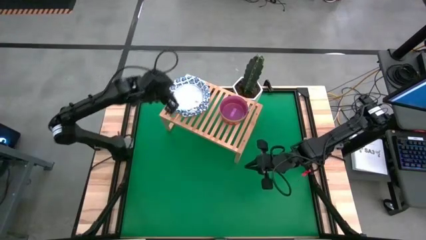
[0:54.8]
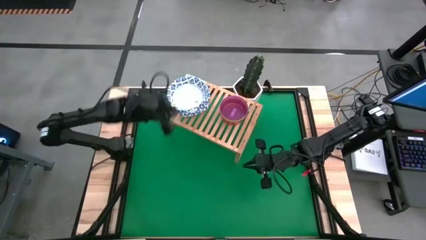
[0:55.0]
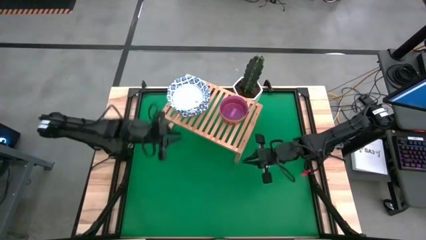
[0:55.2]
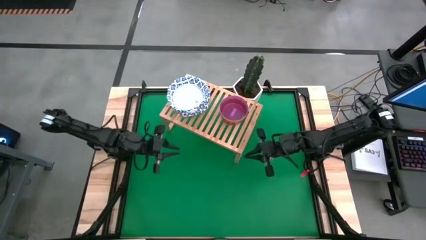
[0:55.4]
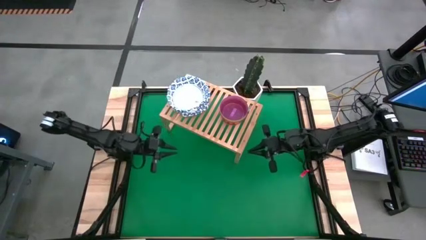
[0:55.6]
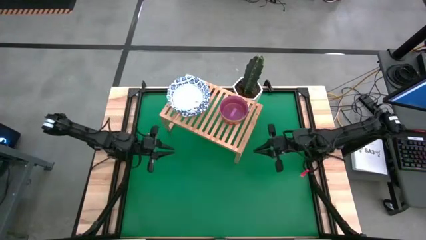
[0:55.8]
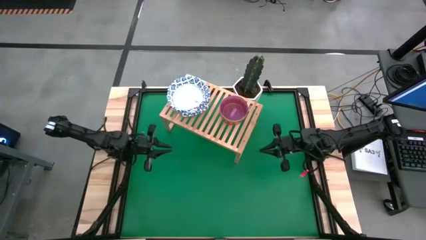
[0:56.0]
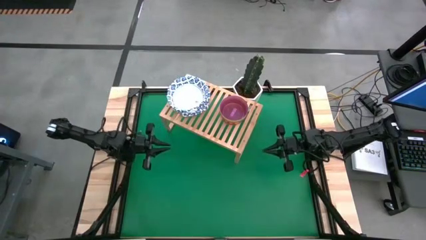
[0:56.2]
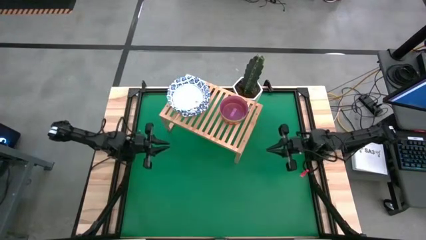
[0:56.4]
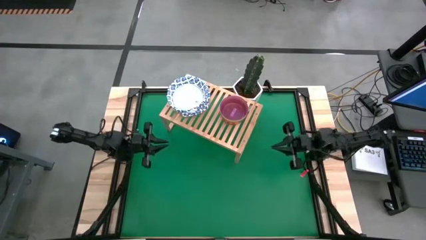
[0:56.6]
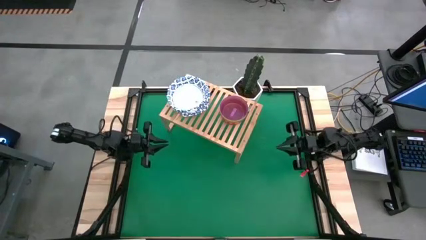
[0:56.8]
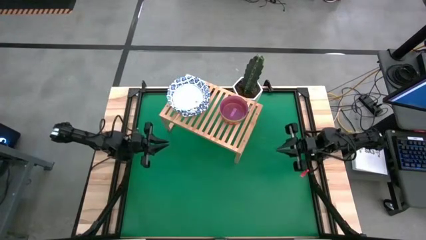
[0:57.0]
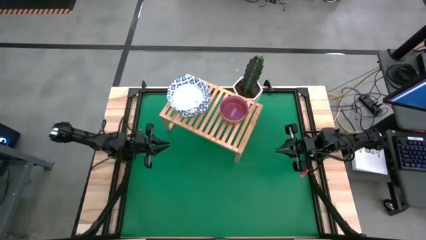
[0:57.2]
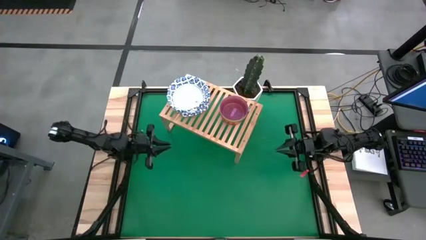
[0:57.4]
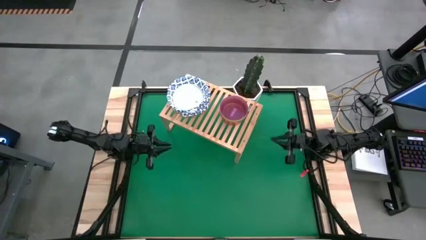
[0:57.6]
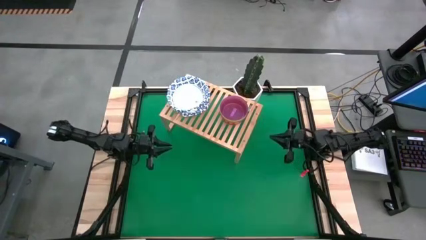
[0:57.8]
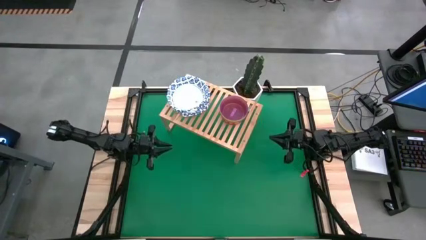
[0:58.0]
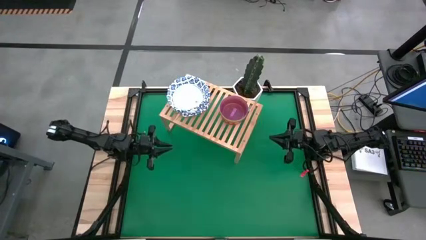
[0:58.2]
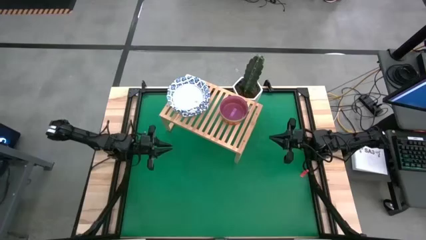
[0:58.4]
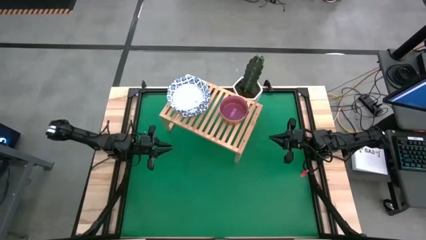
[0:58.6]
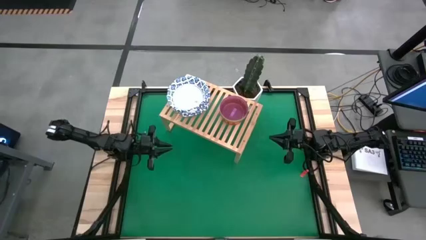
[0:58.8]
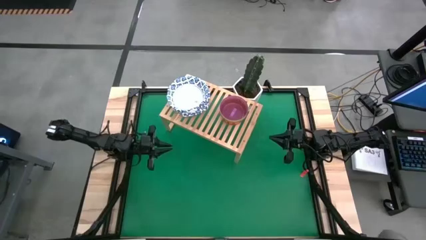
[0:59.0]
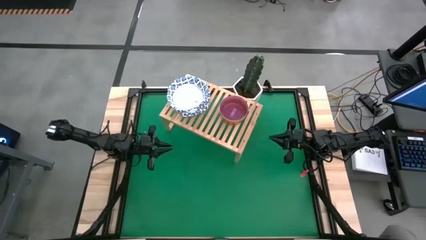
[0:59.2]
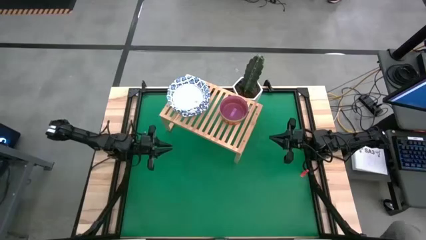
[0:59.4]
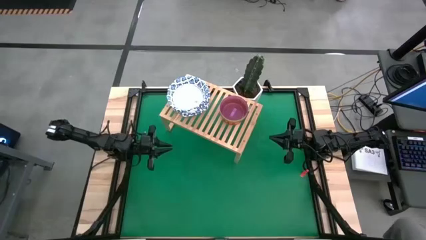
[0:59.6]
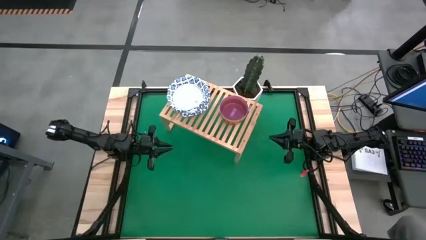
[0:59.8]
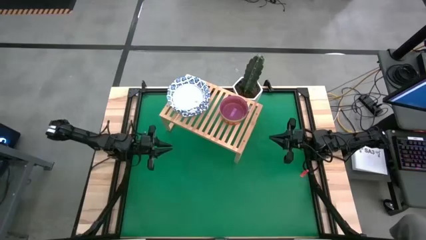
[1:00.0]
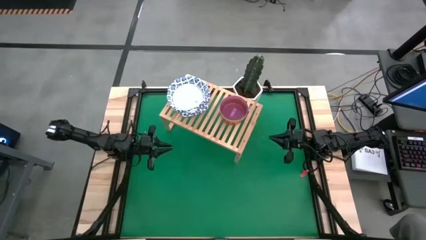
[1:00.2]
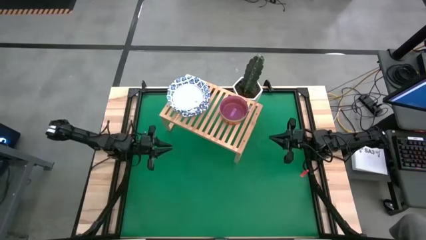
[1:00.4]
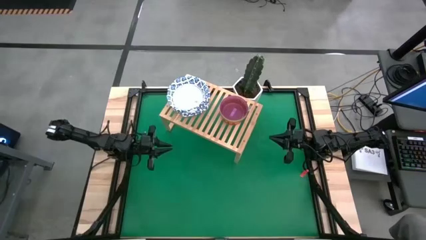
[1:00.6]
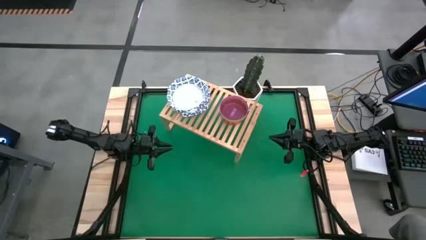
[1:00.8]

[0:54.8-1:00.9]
Task: Place and stack bowls onto a shelf
Return to Home Position

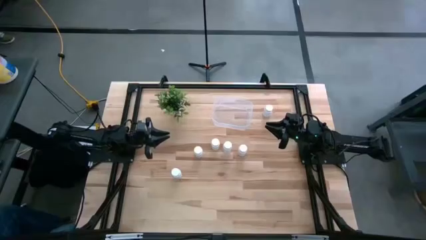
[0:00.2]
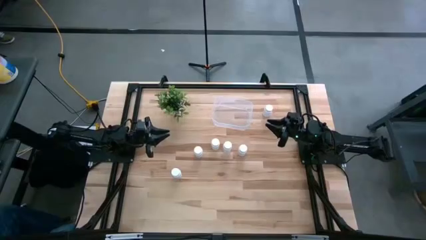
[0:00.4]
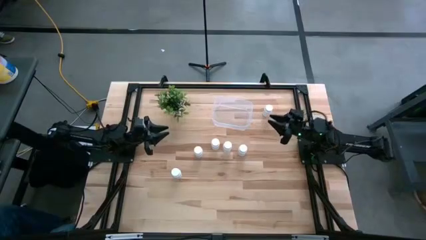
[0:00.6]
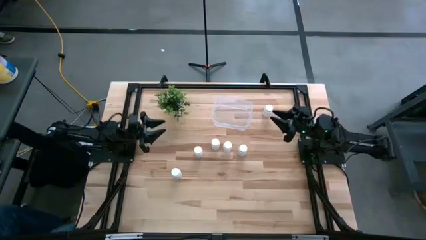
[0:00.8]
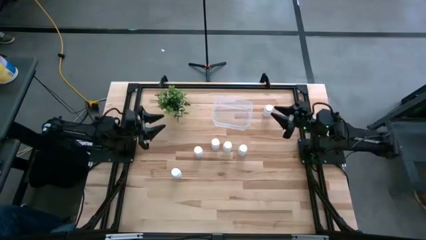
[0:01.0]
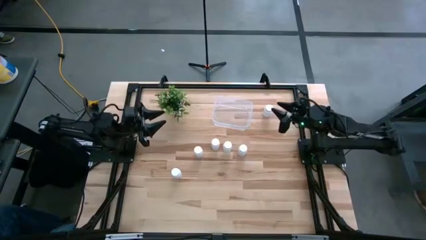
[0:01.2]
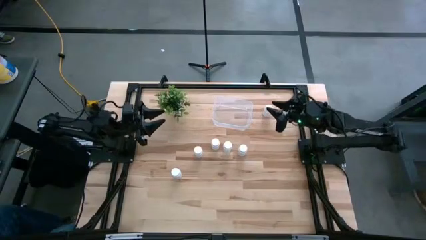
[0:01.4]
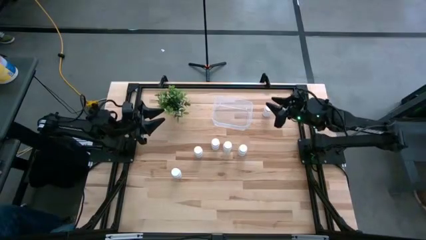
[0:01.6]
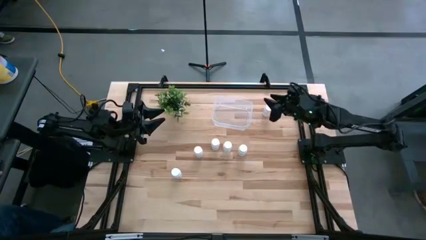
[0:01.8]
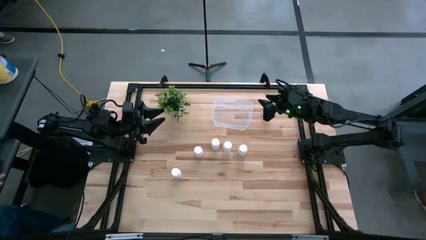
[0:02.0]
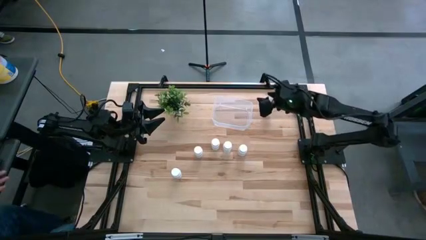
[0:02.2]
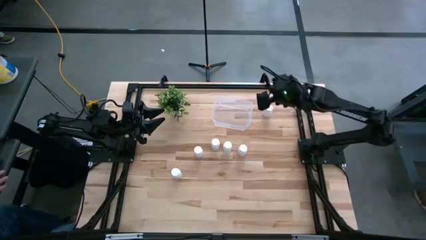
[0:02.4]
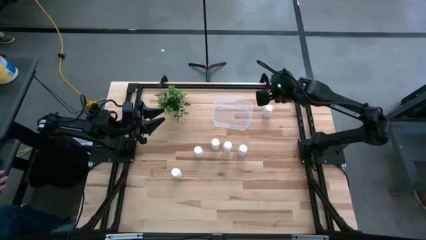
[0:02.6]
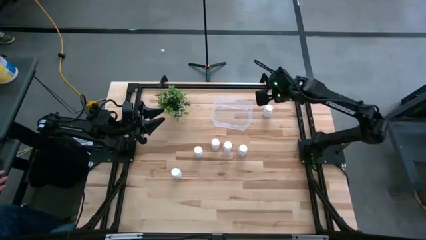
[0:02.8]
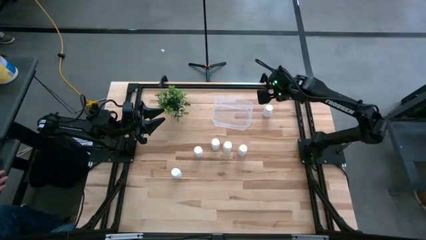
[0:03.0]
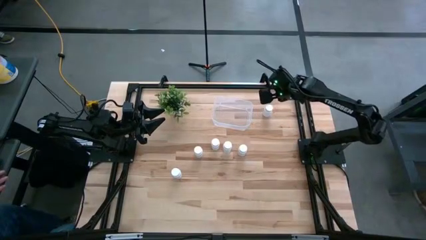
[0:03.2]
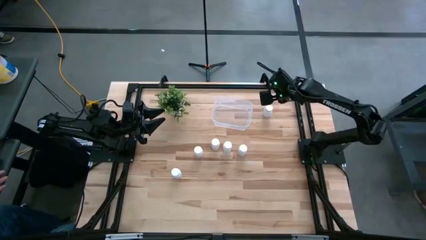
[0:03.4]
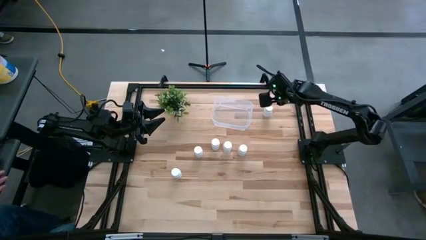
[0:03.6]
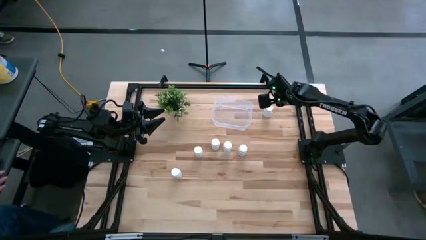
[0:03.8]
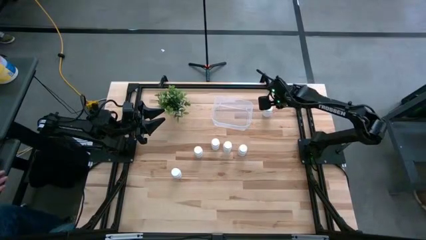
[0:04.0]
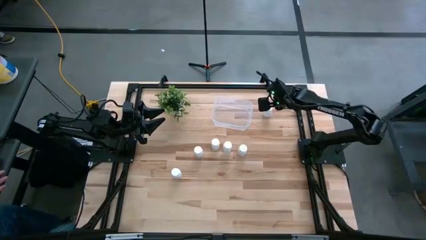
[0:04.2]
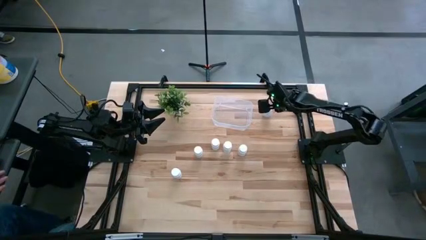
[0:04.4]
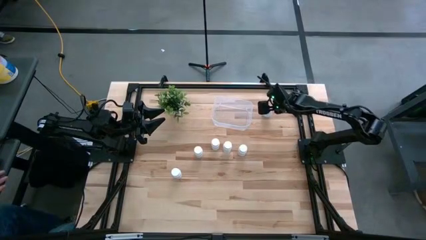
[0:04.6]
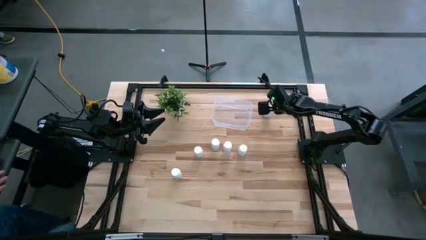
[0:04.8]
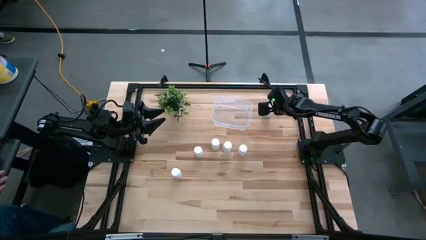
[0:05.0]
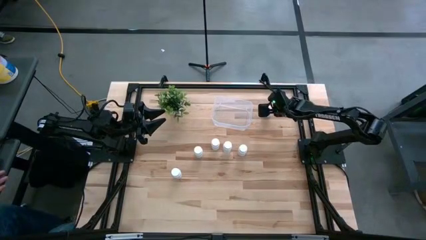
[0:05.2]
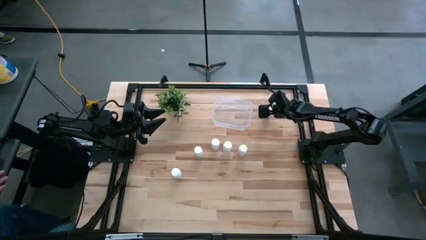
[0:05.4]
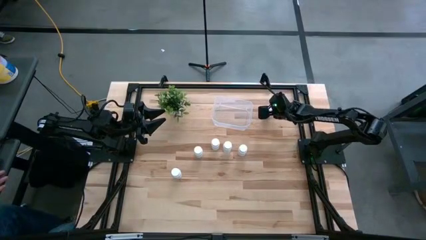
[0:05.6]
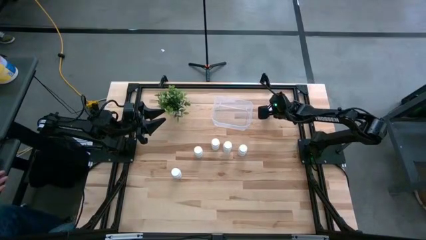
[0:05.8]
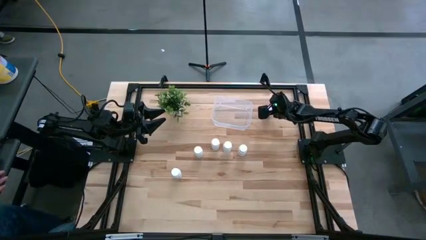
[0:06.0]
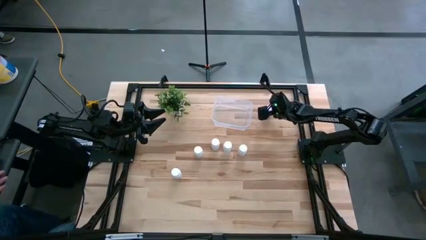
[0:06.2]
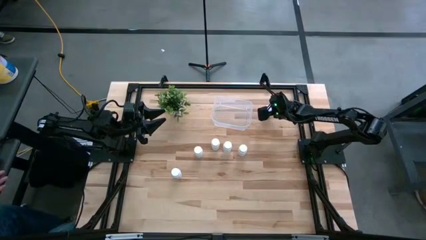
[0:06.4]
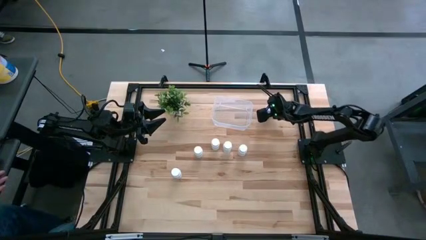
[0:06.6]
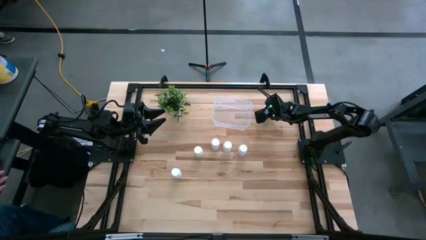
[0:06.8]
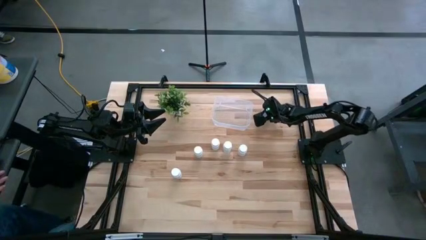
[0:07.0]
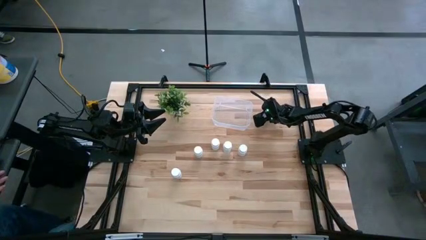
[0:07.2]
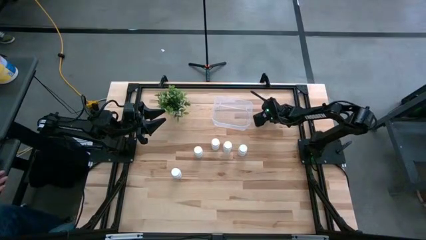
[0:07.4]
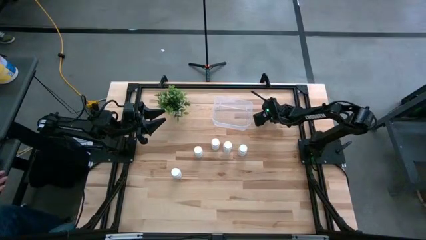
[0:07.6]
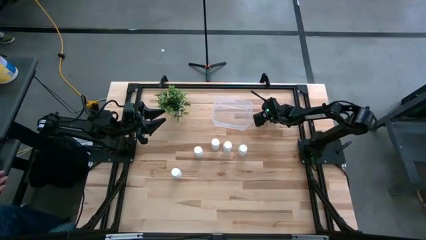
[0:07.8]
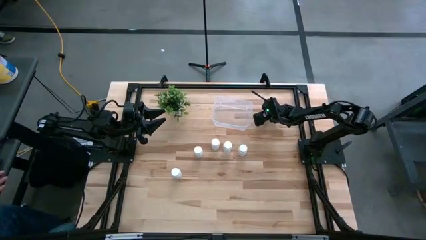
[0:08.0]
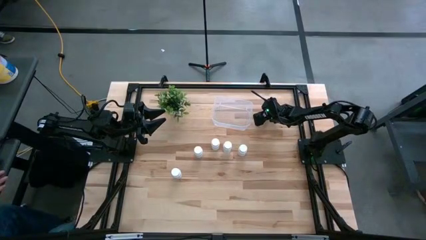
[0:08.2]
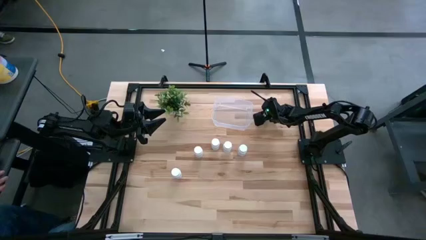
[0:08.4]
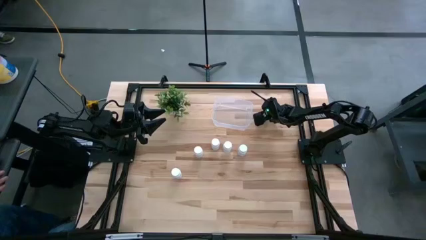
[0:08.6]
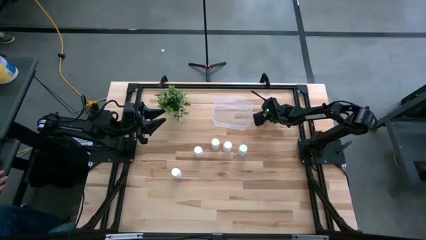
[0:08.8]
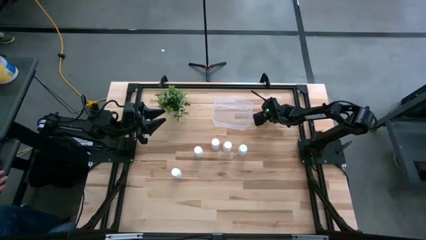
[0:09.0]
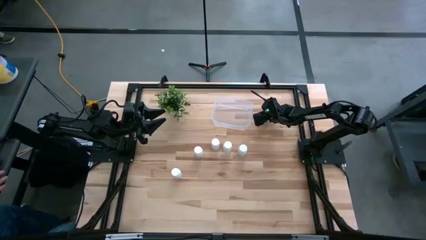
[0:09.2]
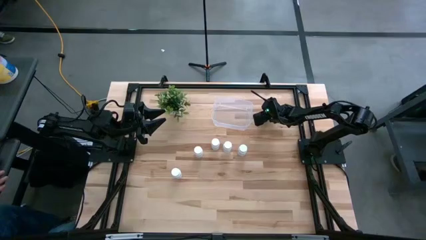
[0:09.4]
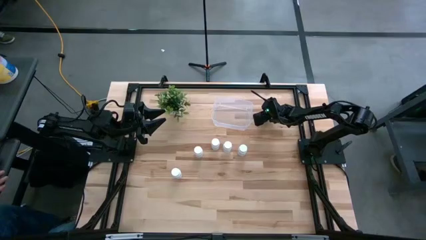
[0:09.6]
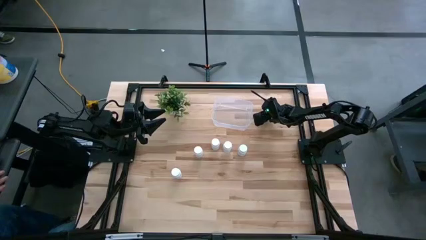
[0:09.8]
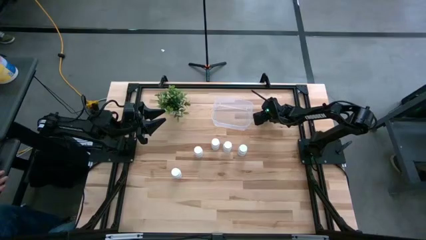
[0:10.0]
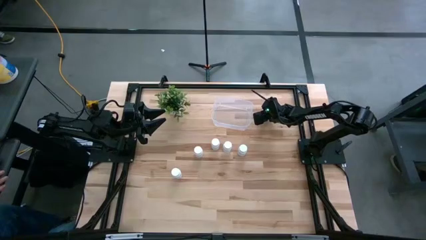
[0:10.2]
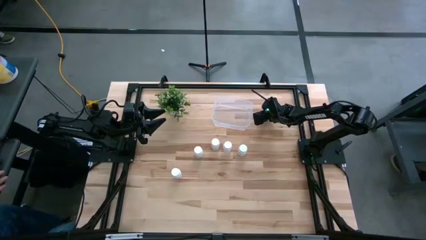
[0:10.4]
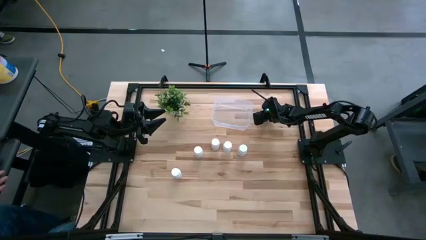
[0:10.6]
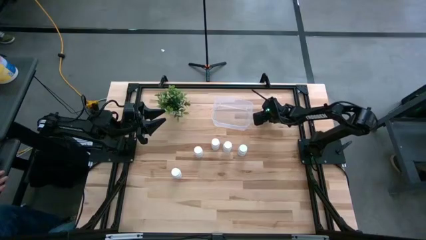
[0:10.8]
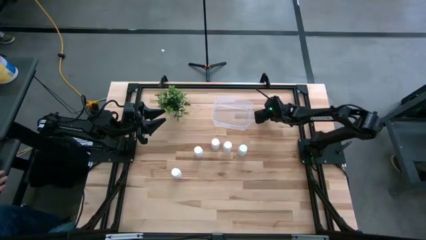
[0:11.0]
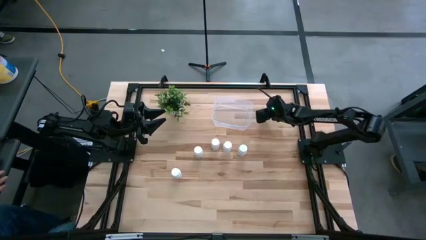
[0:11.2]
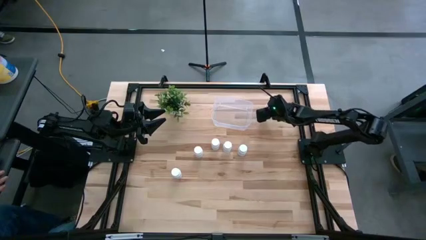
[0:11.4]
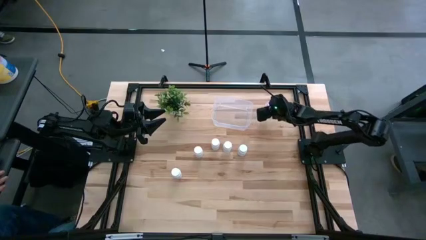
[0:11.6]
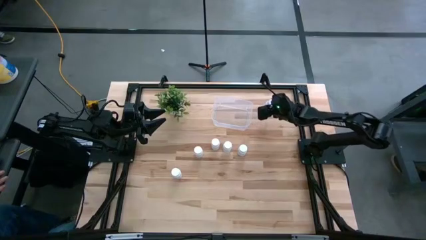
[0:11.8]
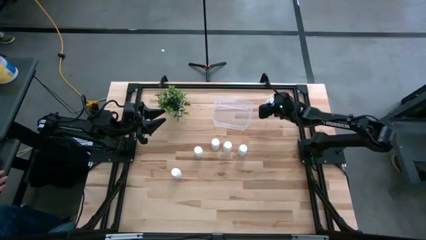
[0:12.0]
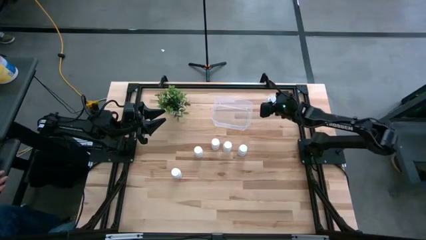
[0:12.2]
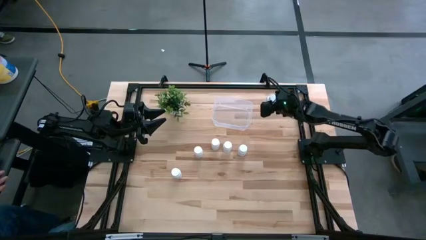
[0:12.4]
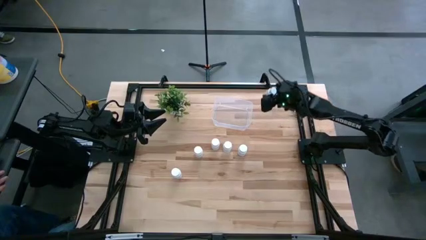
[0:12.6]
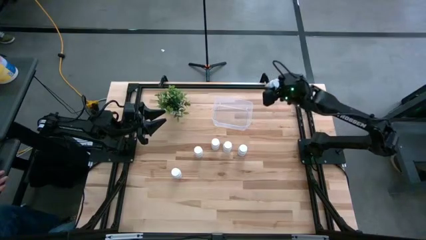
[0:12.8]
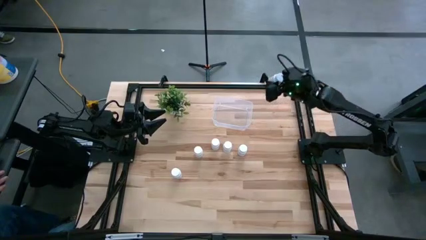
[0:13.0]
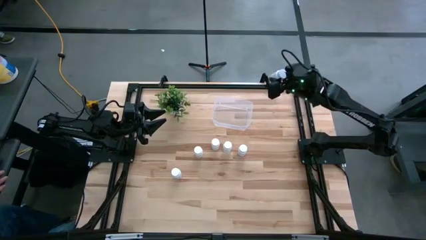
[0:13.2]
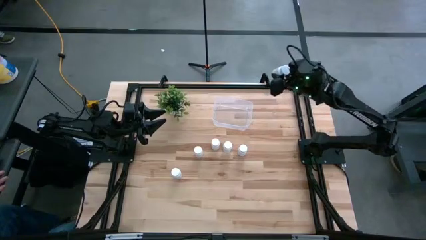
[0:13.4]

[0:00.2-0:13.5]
Task: Pick and place pill bottles into a basket
Put the white pill bottle into the transparent container
